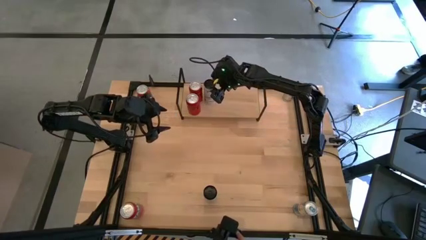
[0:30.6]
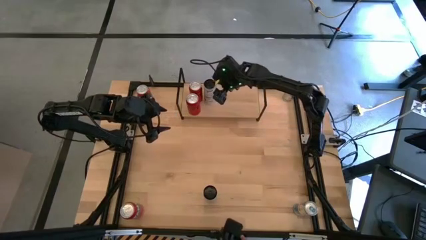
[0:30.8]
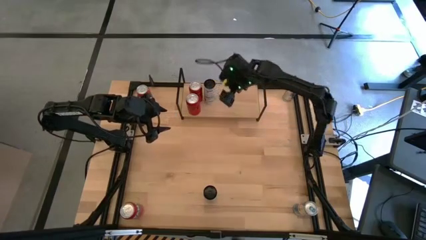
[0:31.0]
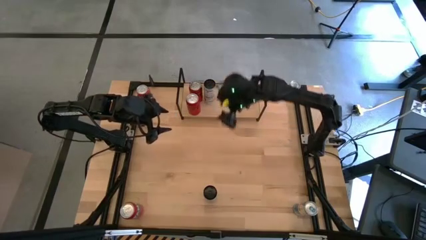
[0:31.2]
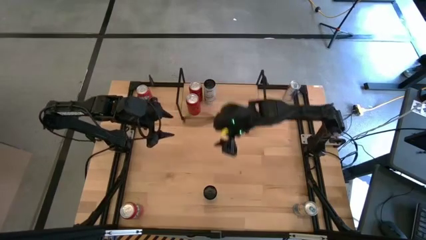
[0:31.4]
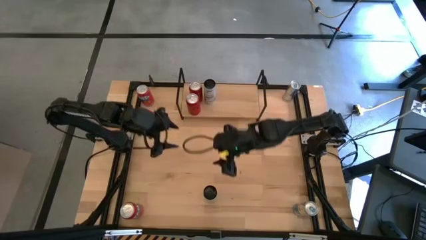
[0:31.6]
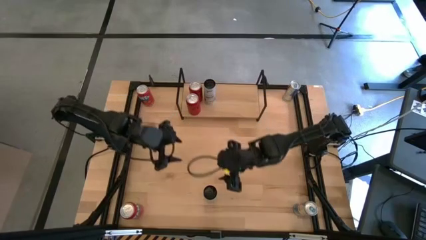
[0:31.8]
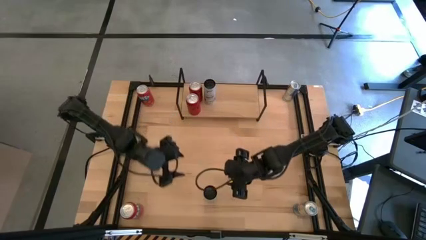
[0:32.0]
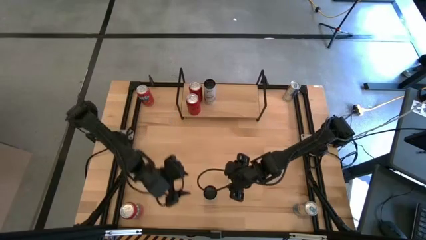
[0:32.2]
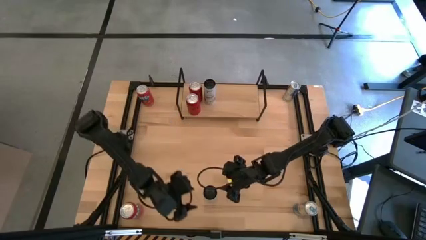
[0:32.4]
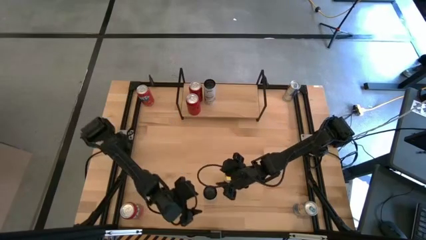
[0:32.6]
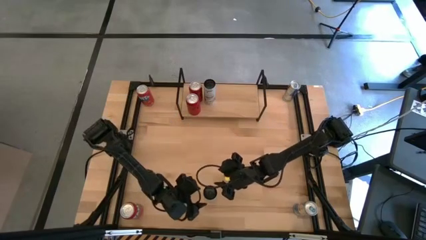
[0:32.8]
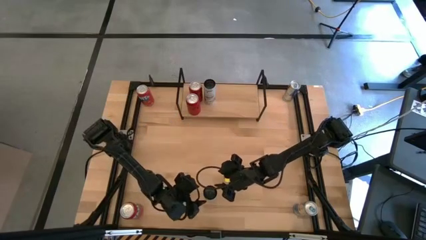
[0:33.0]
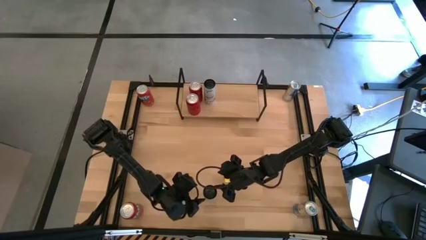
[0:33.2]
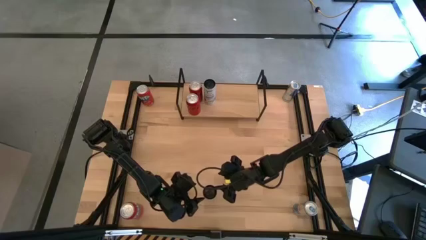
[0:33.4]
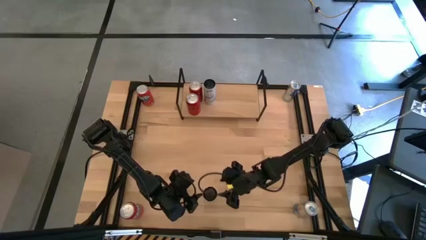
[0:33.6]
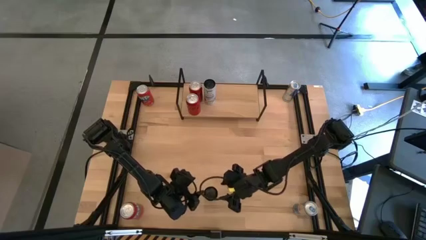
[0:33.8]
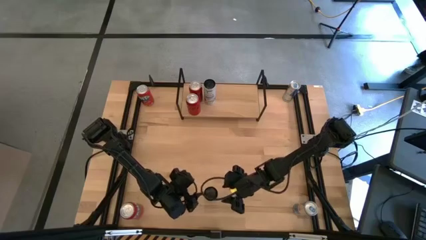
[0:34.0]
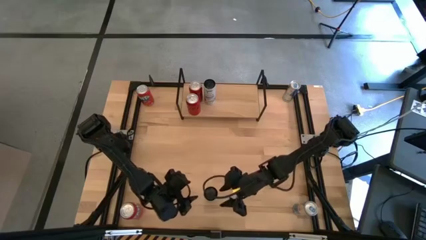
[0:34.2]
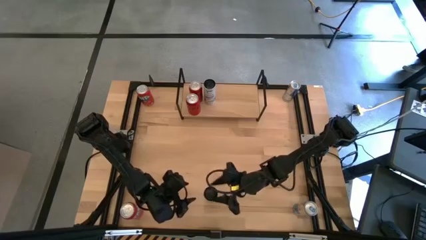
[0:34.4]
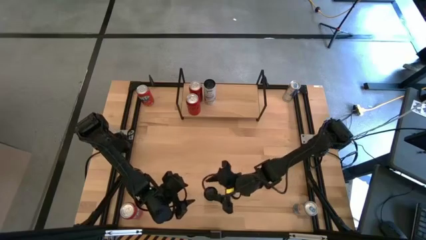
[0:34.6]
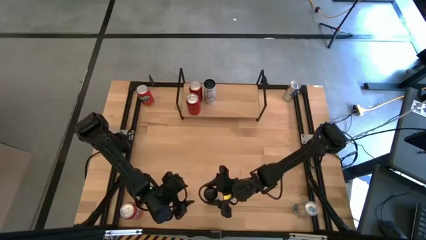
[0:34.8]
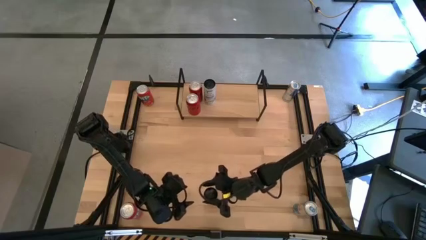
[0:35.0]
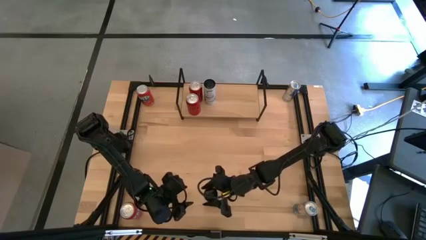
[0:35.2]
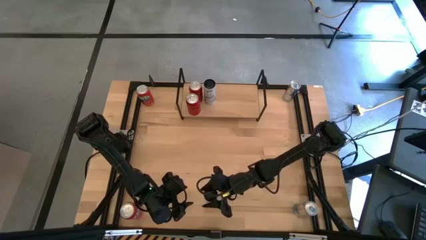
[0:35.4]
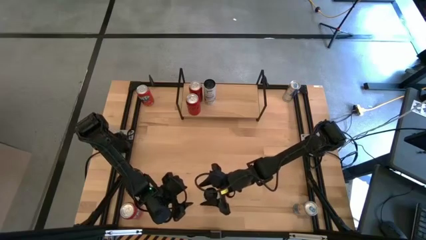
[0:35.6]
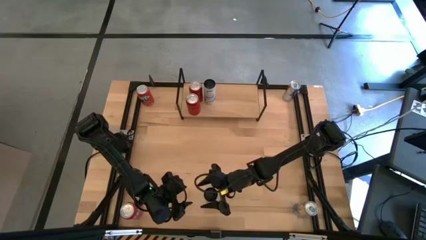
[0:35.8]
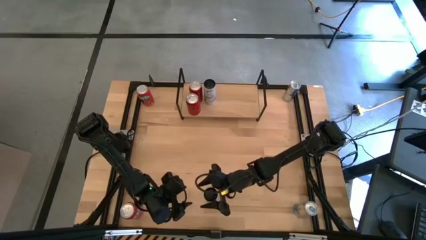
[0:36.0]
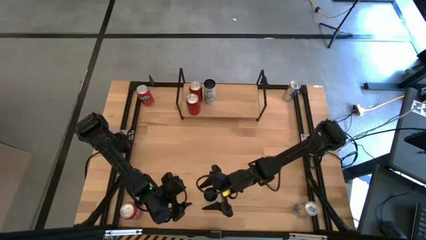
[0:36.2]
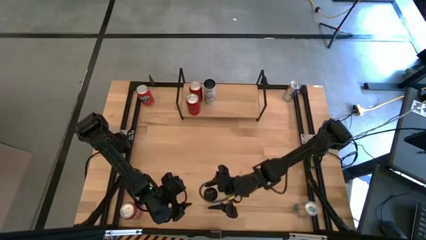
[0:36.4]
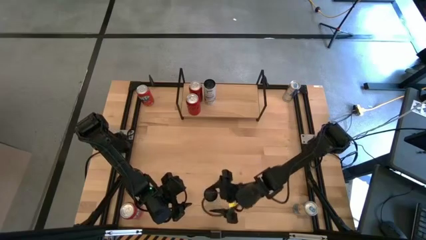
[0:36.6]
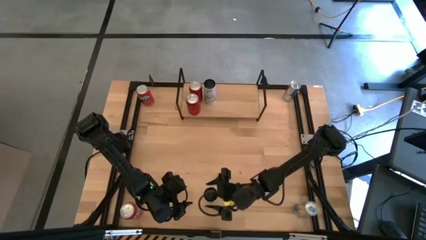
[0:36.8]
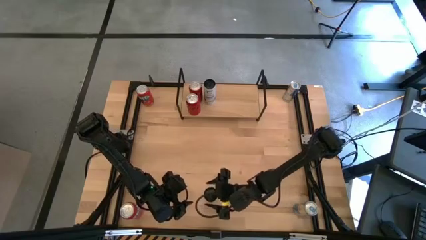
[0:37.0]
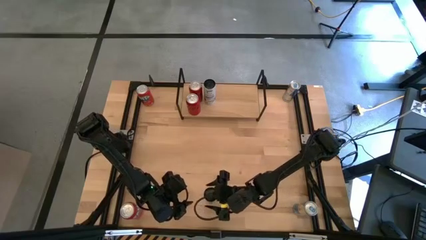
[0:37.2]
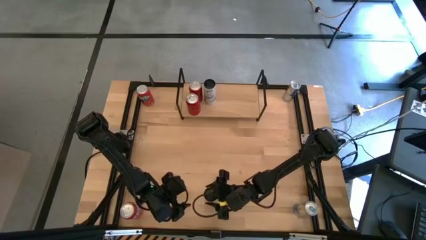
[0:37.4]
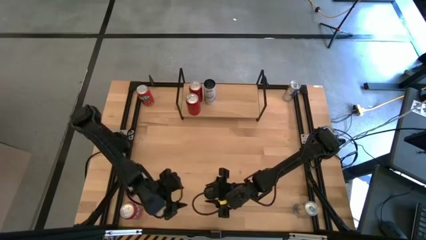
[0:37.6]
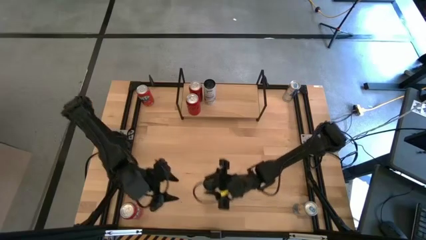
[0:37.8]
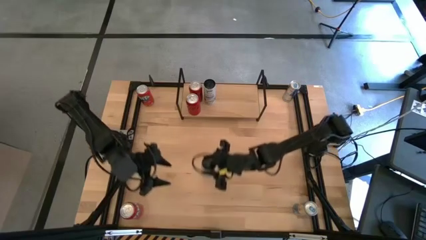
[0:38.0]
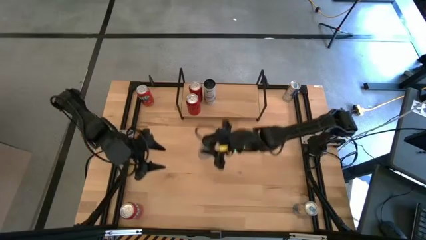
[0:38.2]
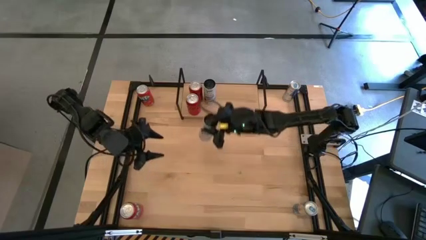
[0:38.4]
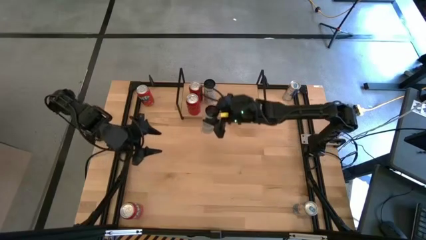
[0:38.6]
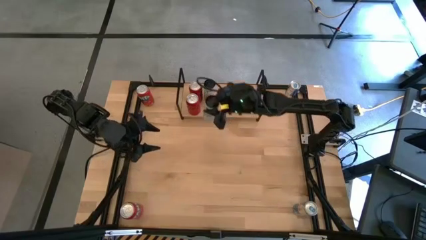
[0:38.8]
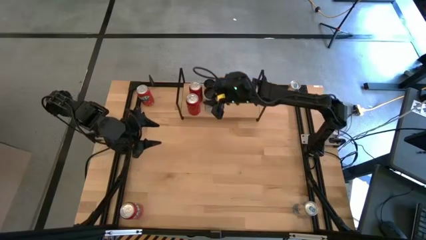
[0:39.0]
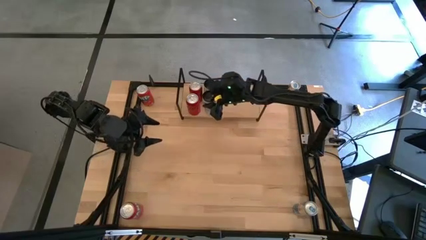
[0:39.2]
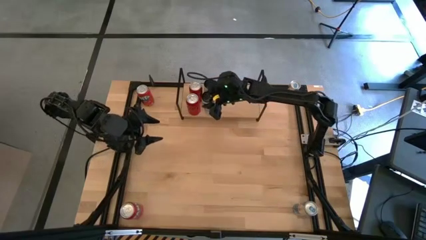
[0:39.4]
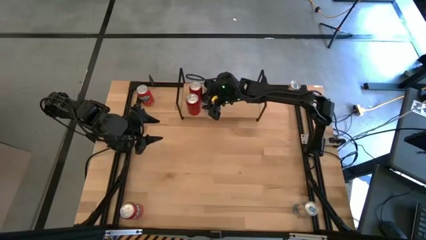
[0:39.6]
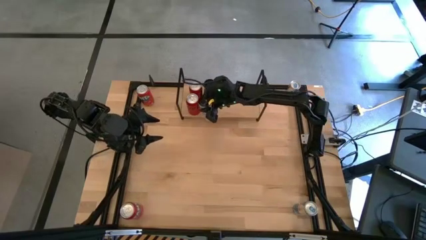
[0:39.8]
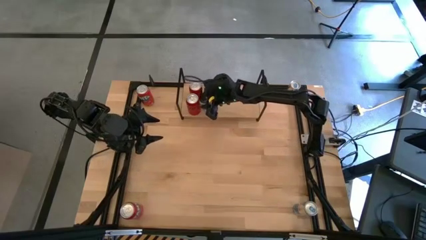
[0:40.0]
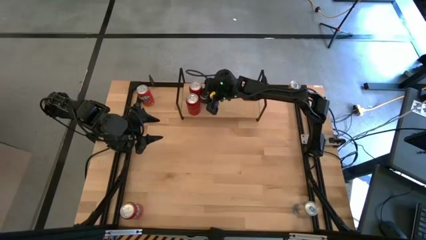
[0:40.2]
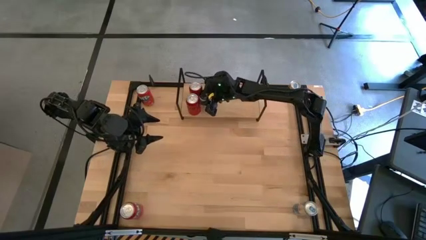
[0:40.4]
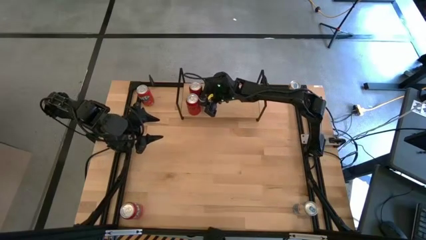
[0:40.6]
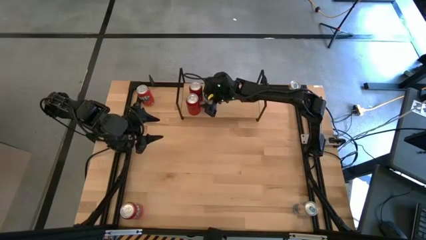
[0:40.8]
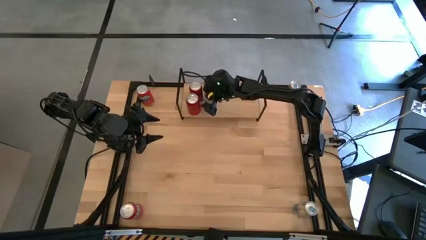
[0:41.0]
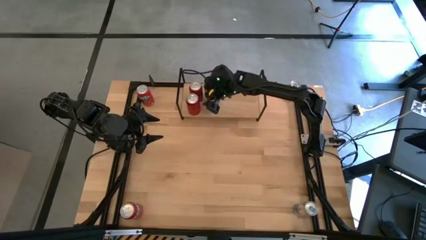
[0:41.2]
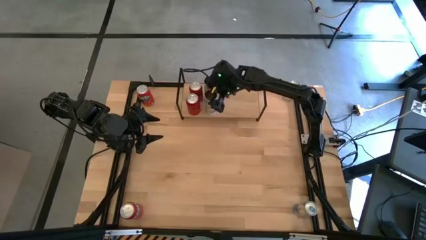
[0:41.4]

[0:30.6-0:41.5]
Task: Place canned beverage on shelf
Put the white and blue soda can on the shelf and align it with the other white and blue soda can

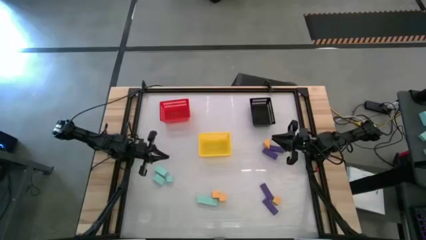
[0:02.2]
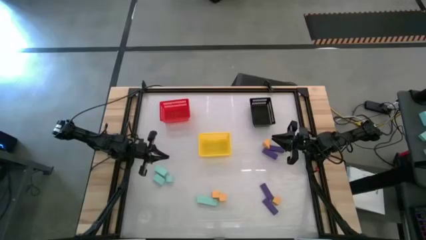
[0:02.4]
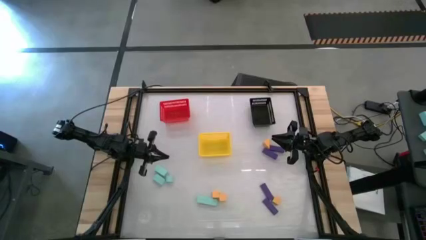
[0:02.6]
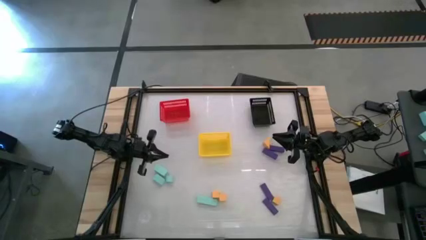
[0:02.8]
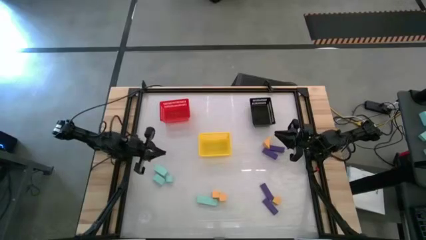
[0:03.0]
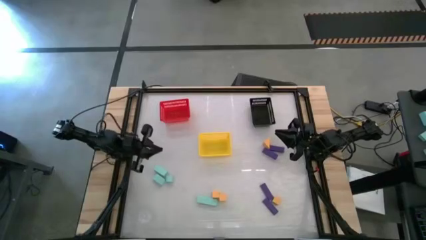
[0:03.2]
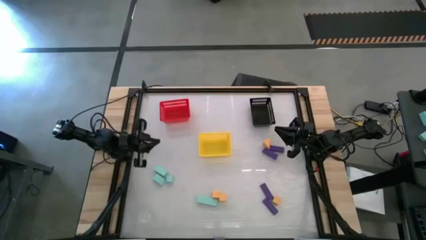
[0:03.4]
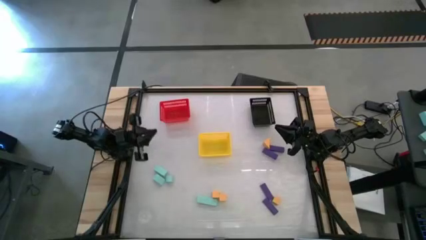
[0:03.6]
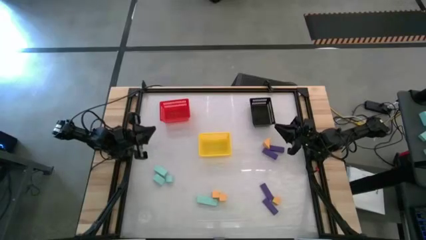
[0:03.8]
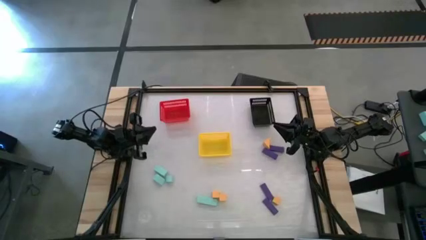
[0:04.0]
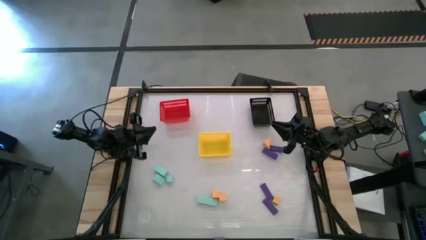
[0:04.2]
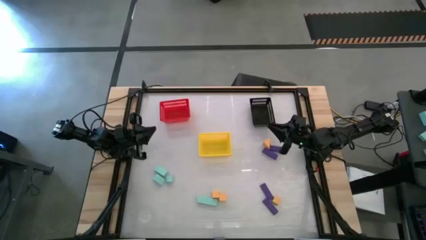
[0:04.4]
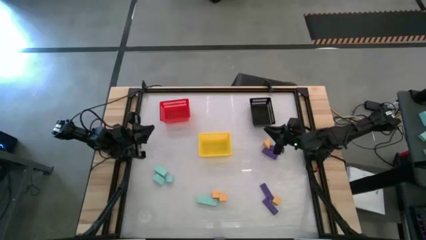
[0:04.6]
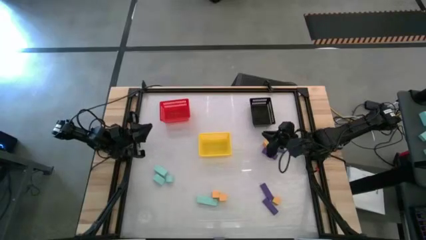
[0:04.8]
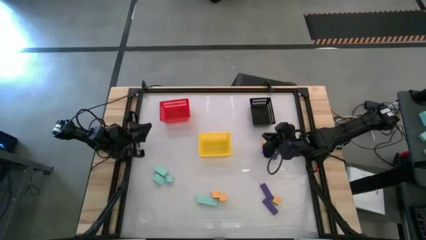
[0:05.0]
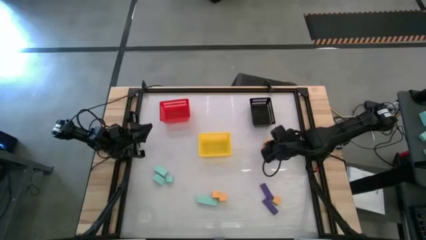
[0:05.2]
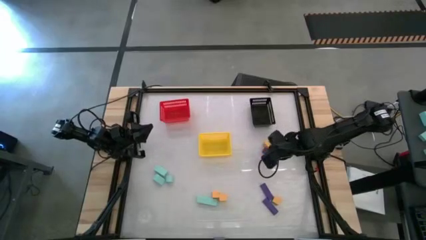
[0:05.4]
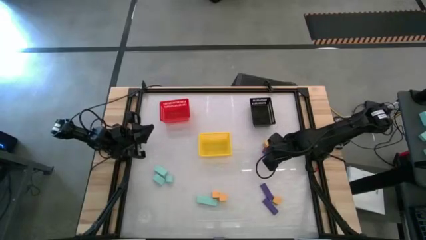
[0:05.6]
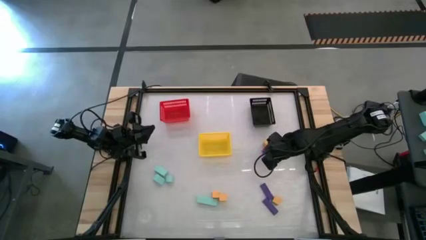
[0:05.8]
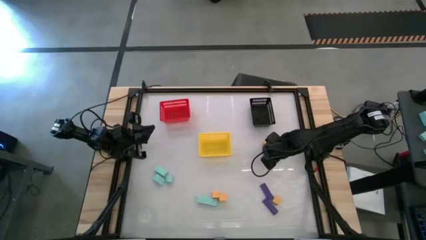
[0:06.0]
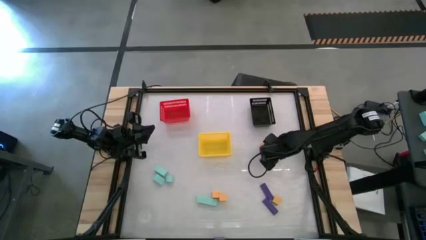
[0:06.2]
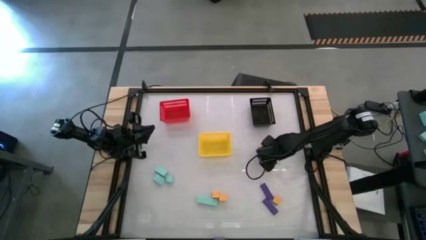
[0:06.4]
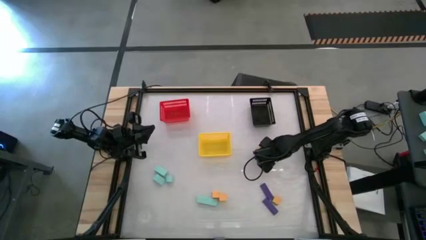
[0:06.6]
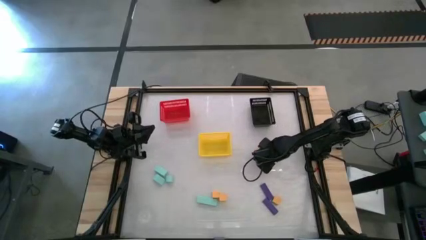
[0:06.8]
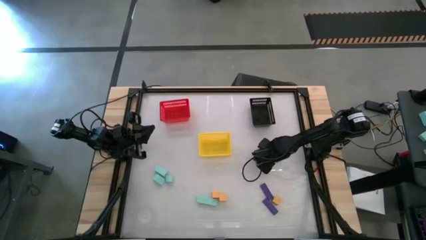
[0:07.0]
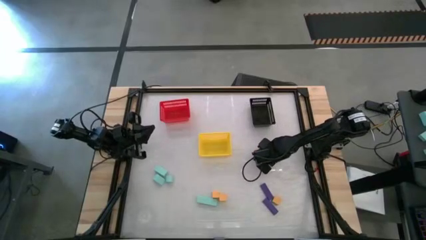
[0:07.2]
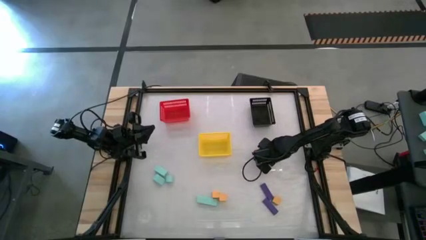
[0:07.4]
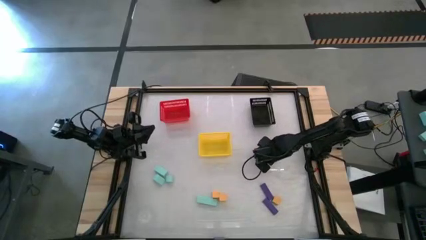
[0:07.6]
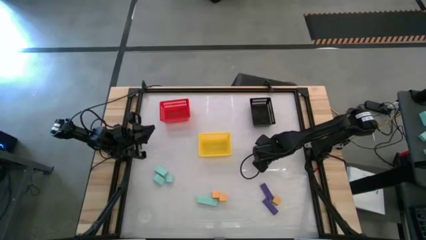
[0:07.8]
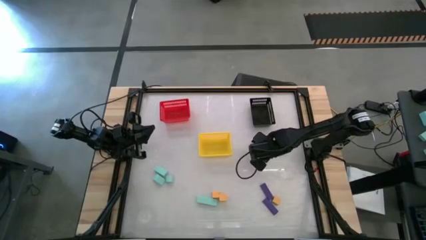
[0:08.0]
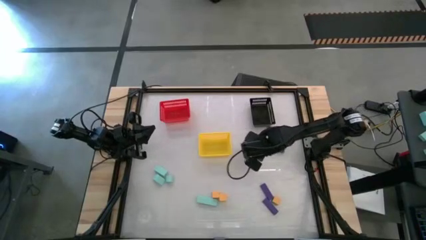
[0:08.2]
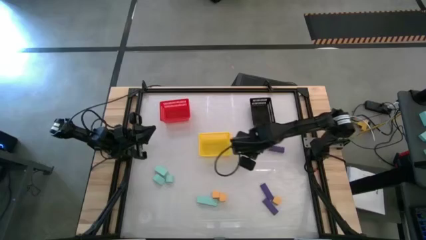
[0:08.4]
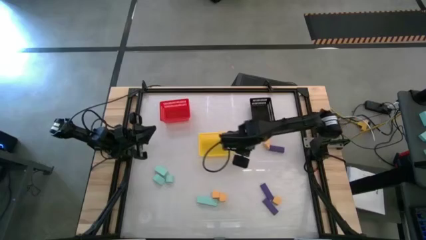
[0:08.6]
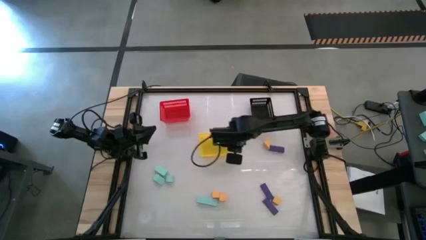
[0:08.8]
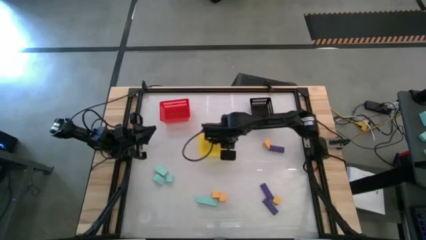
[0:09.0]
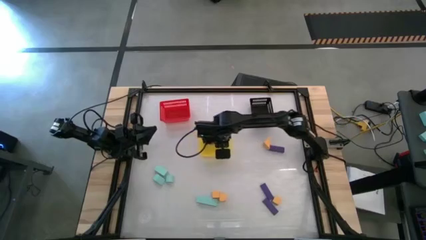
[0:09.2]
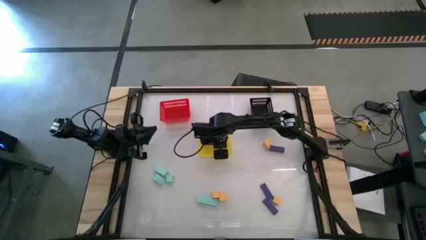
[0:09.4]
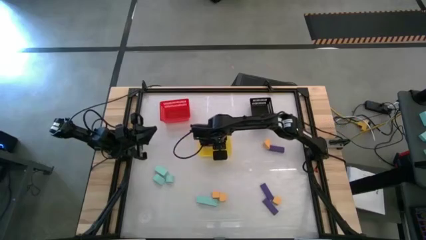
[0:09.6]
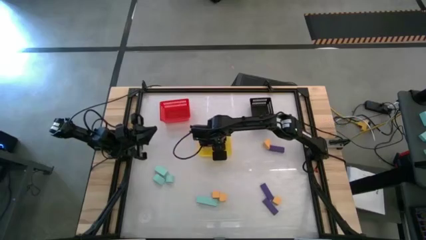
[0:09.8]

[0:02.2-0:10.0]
Task: Sort & place blocks by color
Put the violet block into the yellow bin
